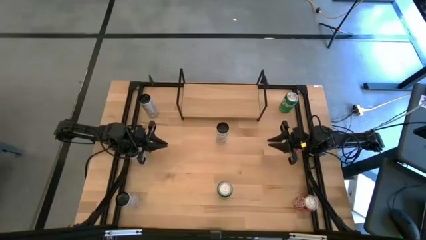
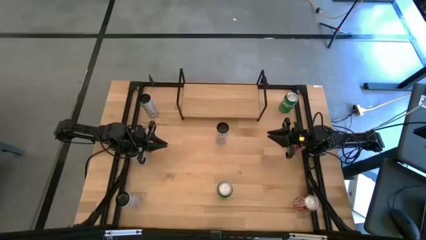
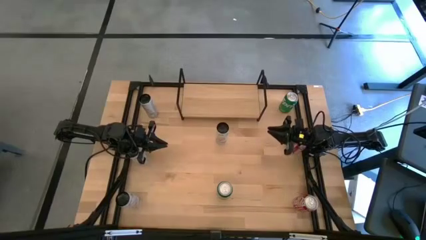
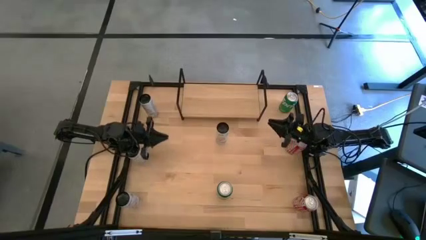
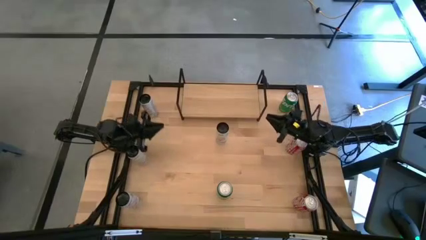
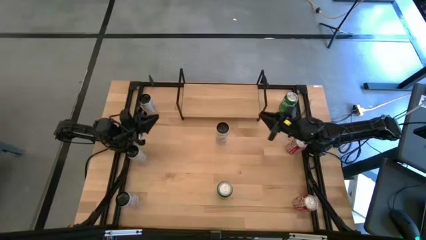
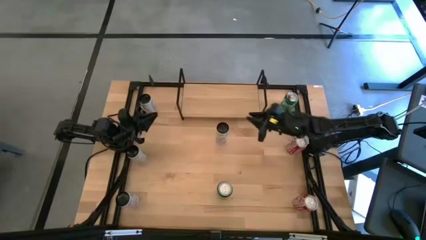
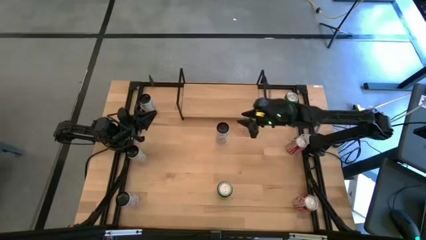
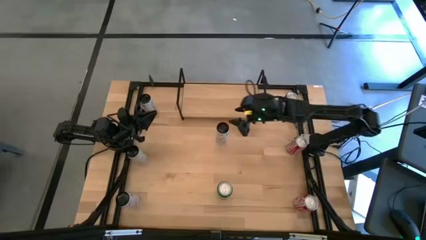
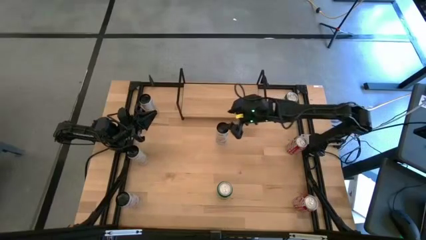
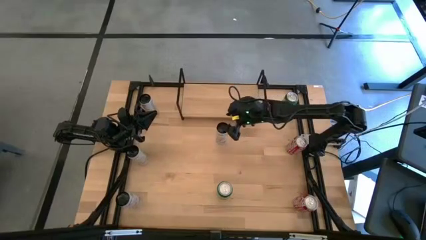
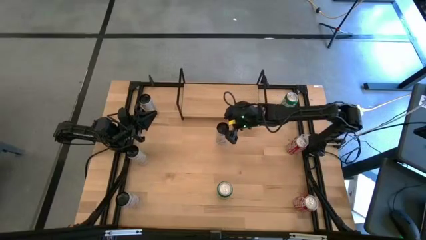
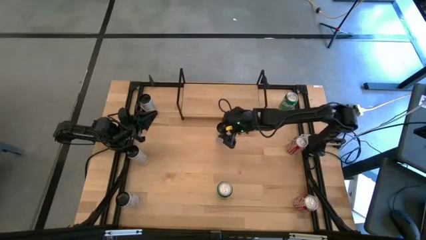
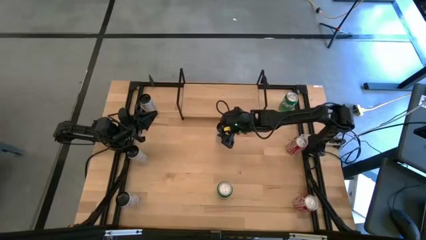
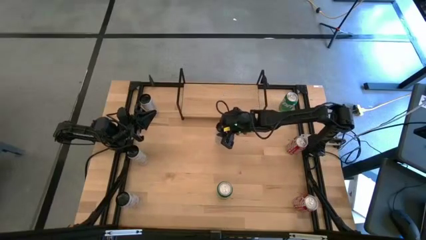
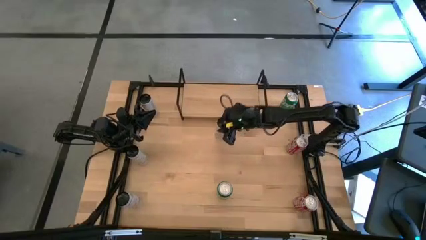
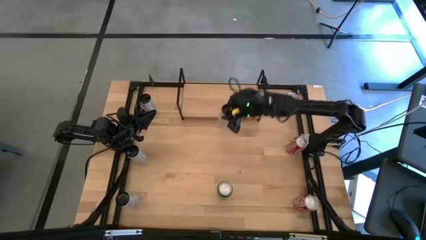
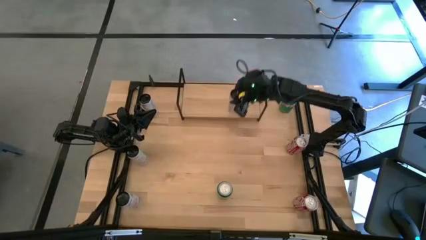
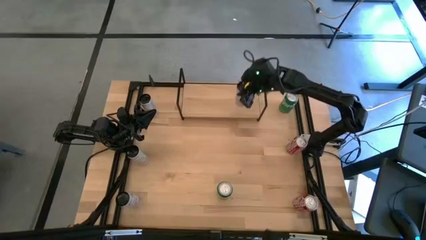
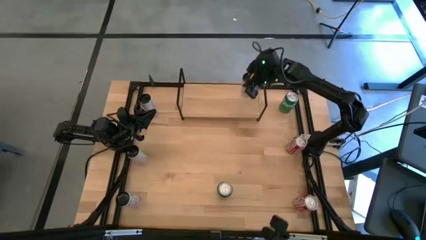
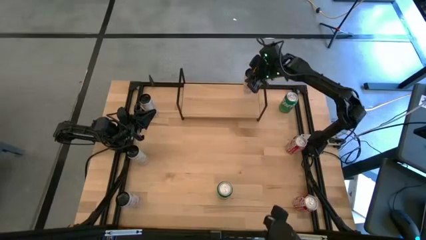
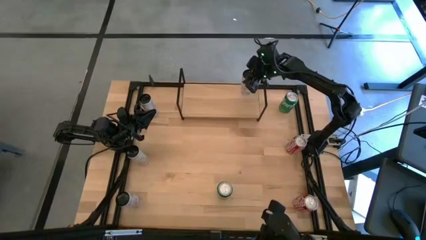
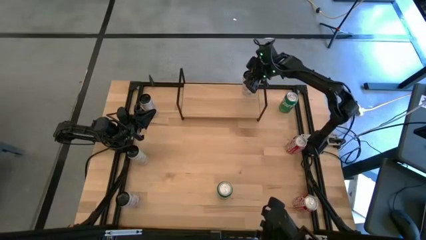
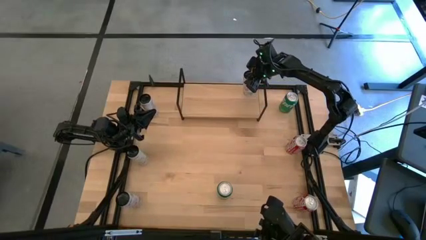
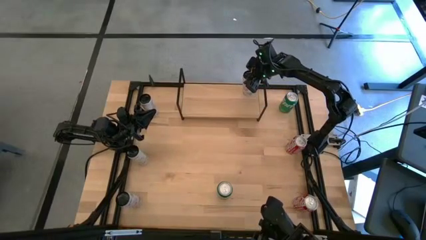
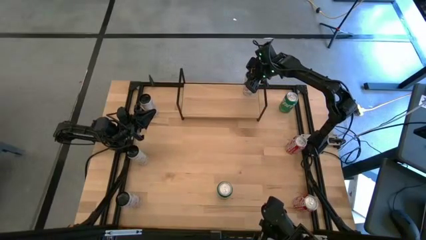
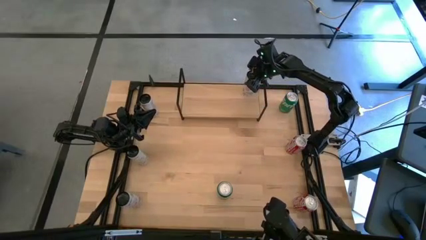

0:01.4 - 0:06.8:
Task: Place canned beverage on shelf
Put the white pink soda can on the shelf

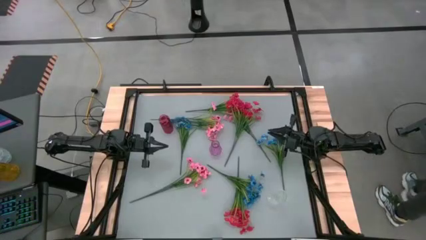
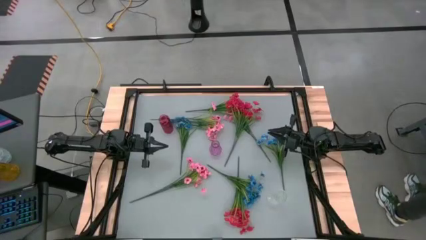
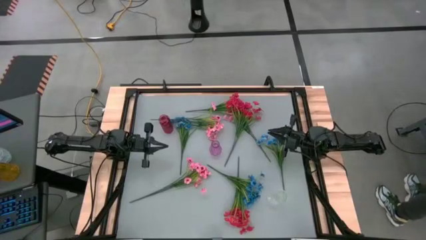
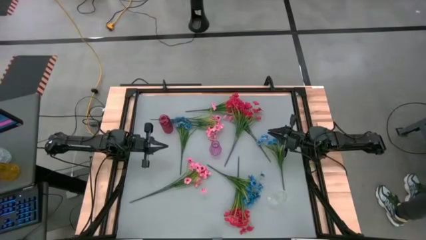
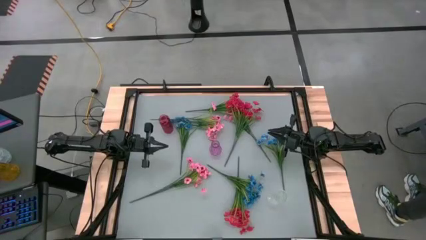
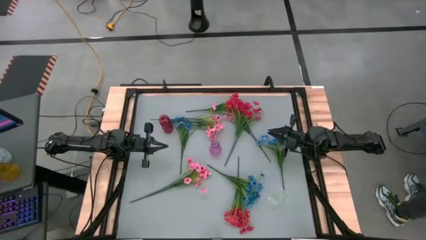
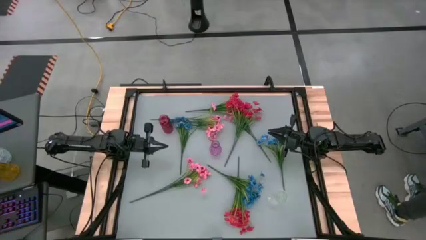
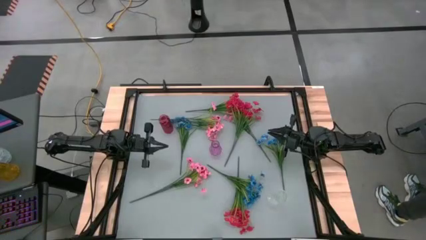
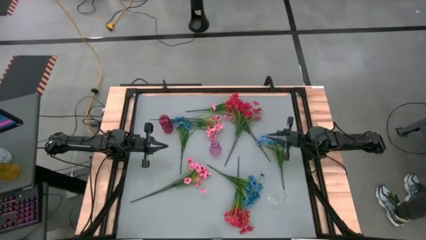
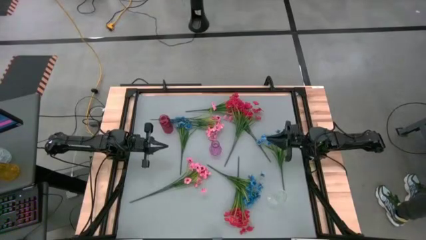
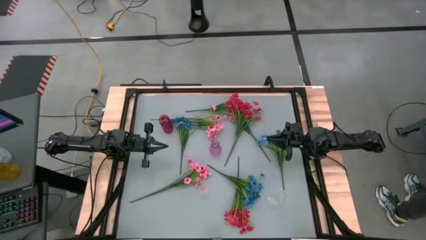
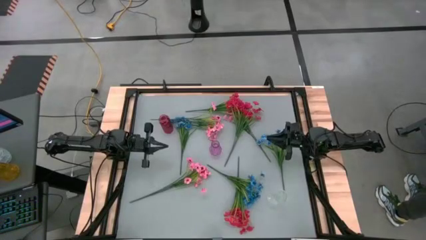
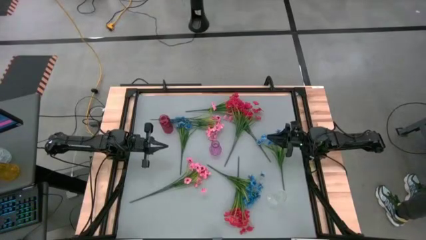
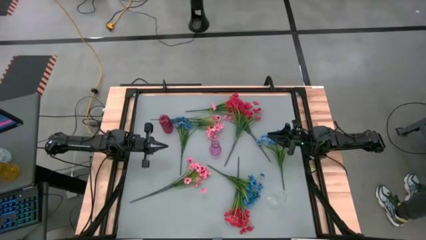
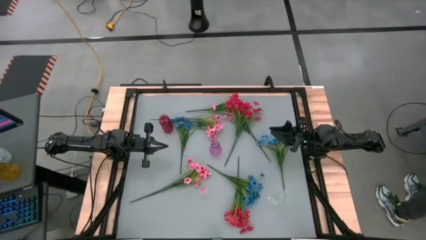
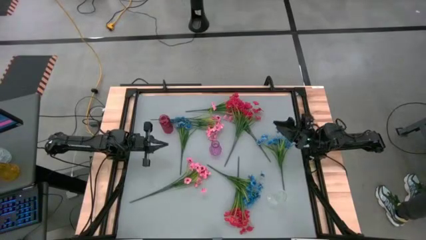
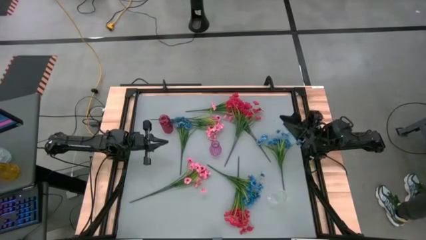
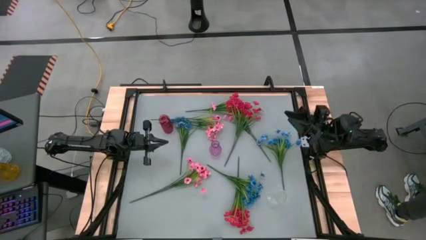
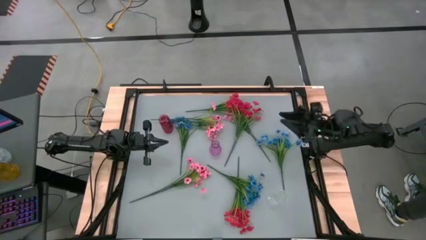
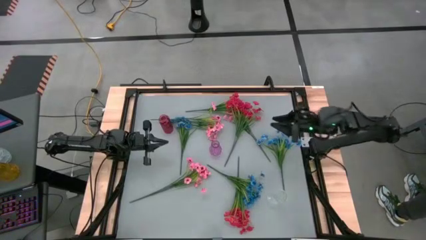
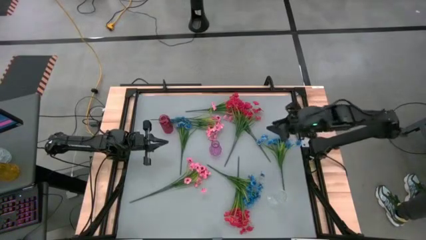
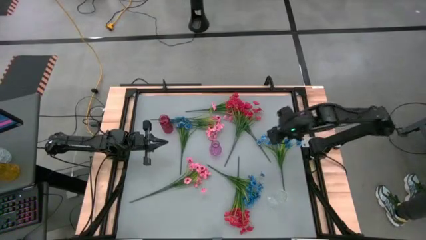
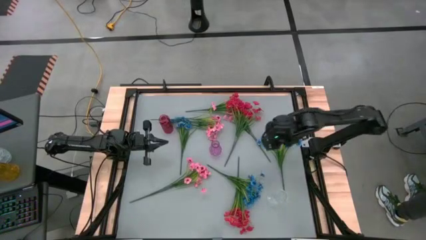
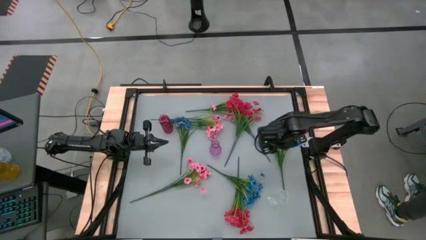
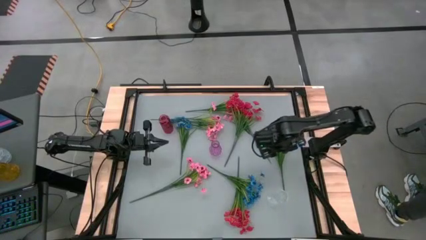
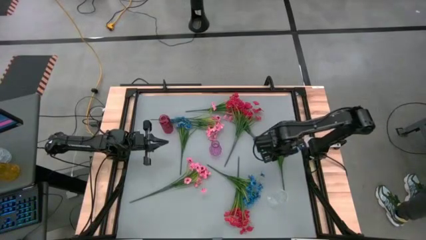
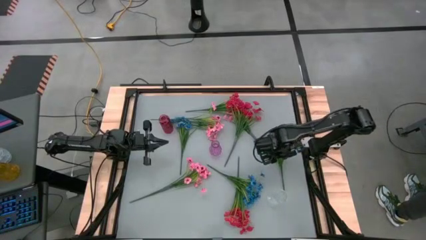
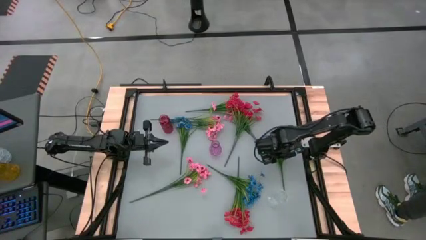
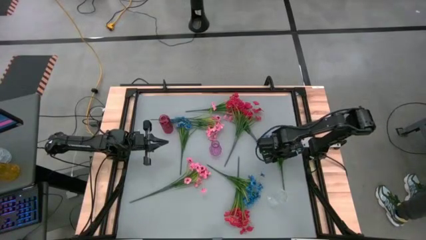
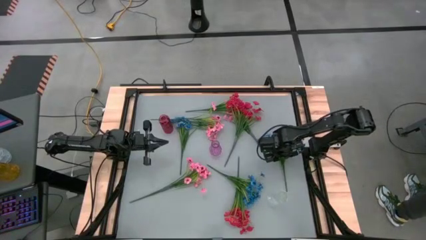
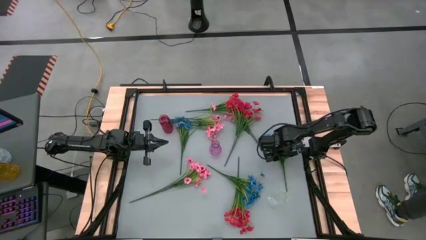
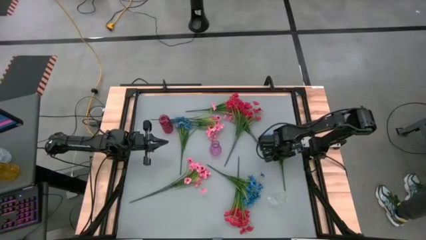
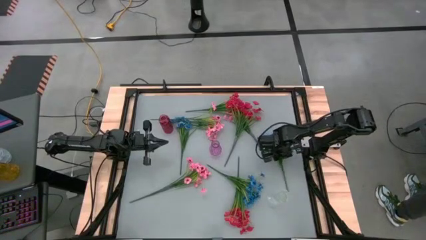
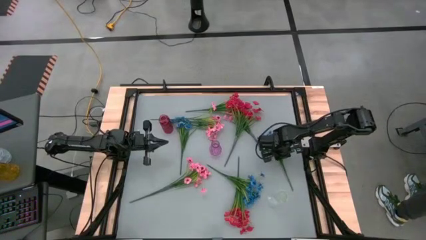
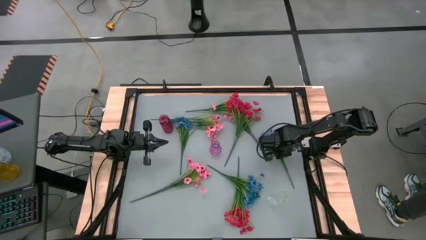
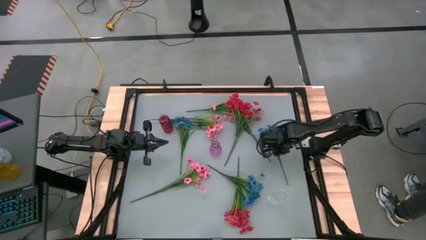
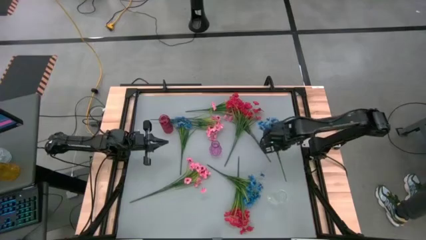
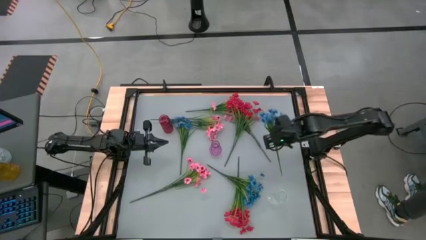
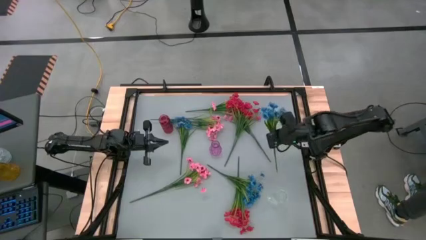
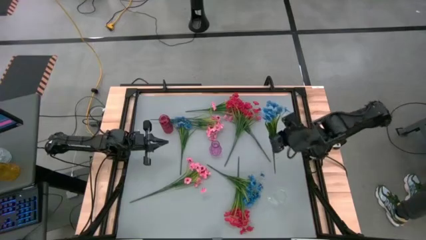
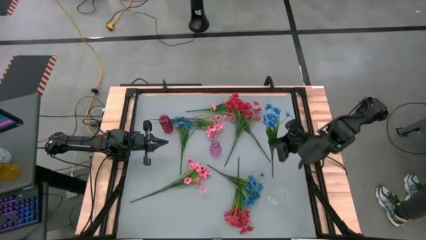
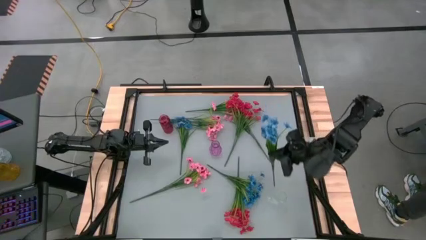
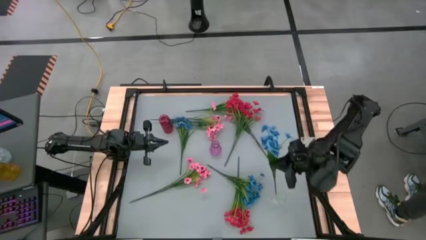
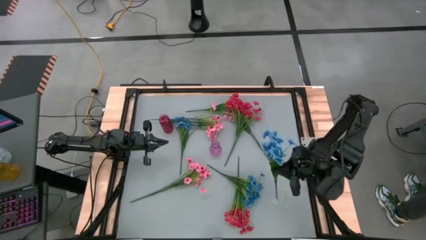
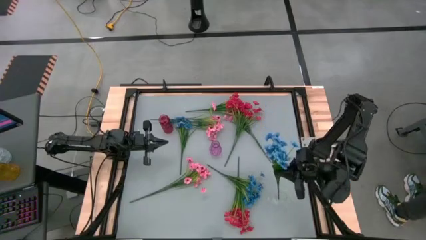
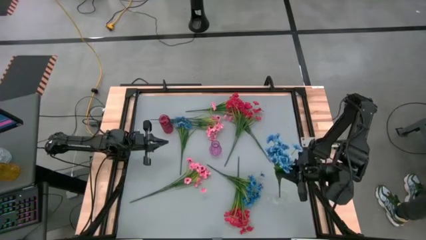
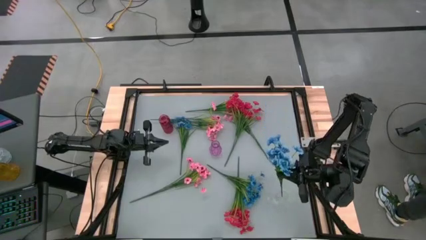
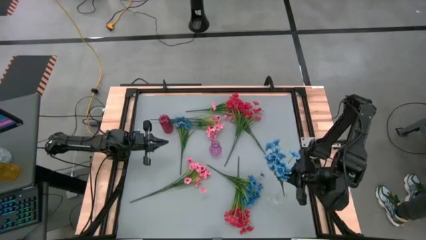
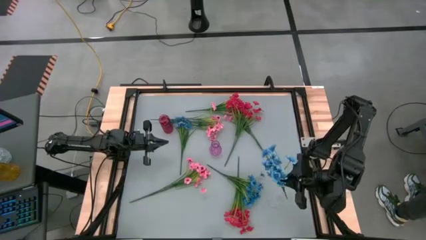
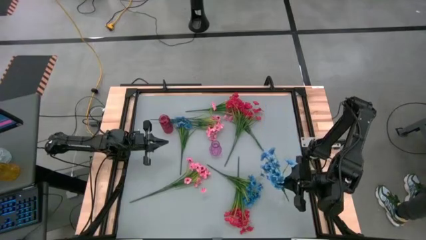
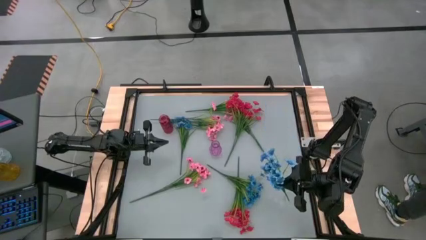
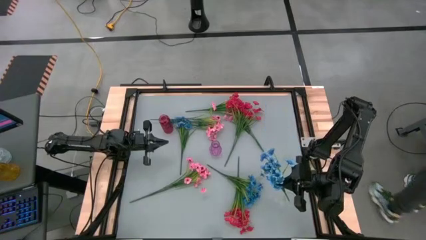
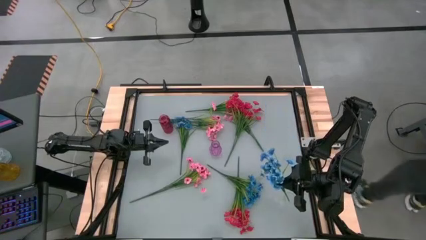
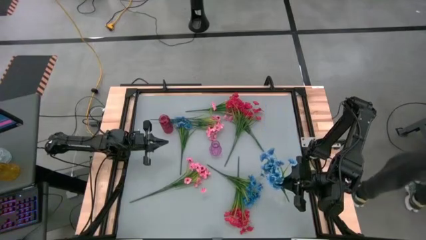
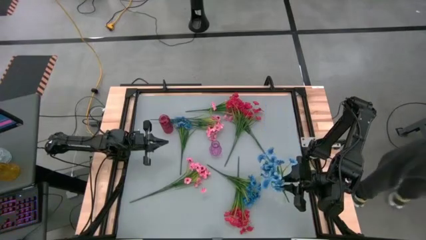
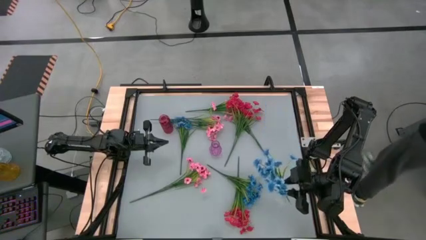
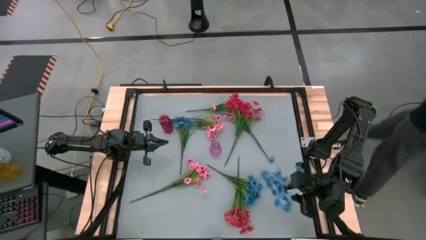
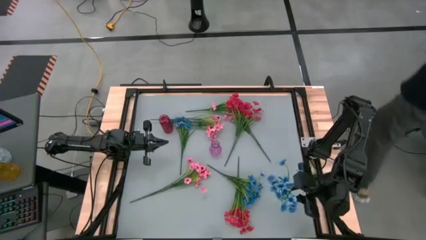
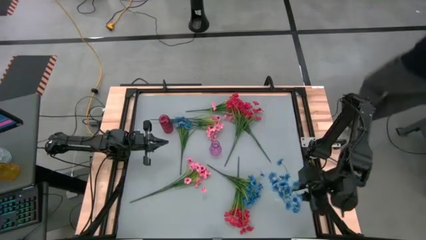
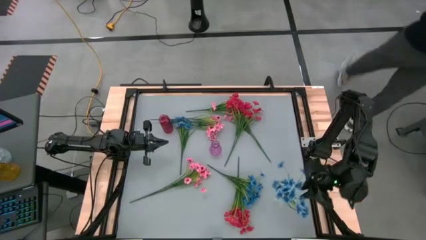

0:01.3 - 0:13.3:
Task: Sort flowers into vase by color
Put the right blue flowers into the transparent vase
